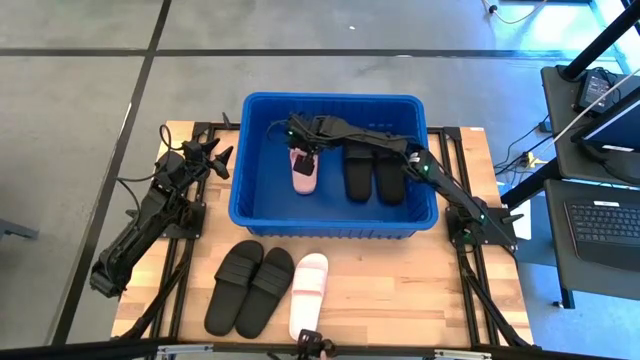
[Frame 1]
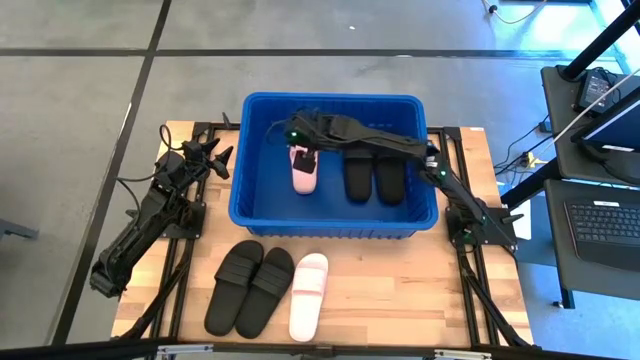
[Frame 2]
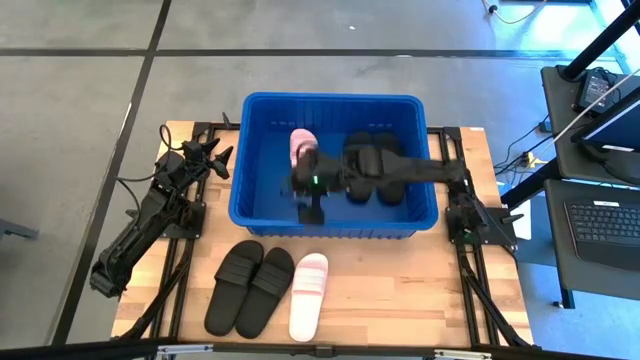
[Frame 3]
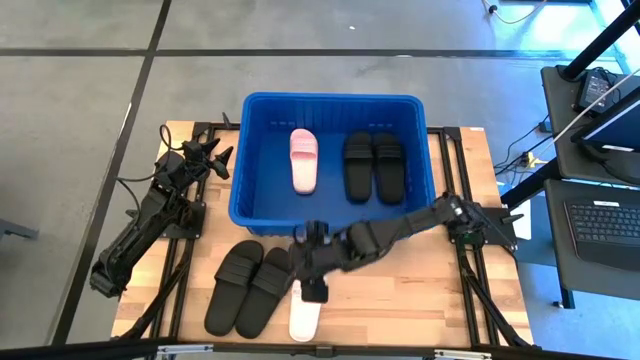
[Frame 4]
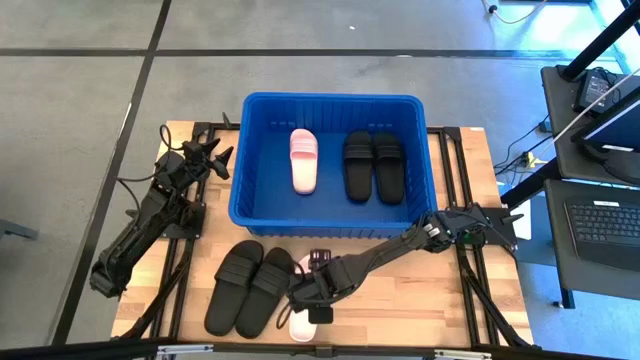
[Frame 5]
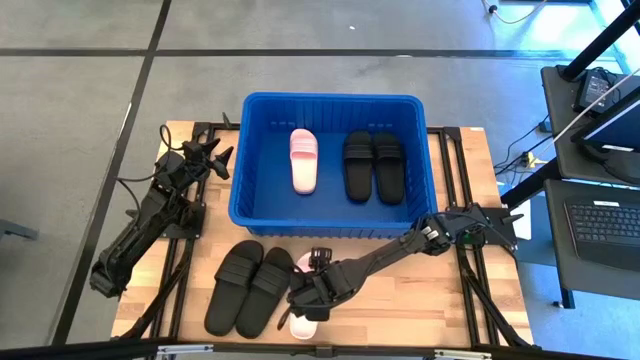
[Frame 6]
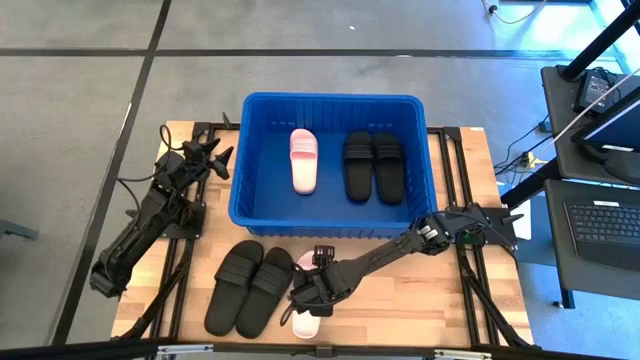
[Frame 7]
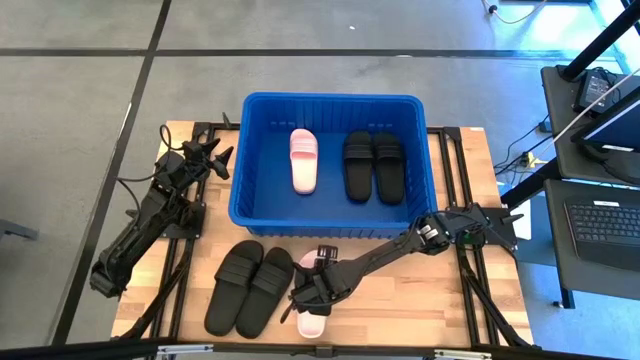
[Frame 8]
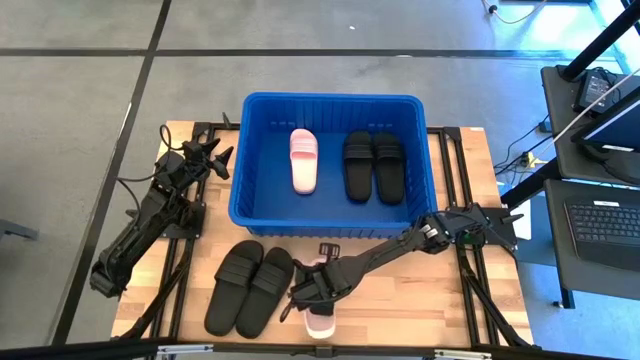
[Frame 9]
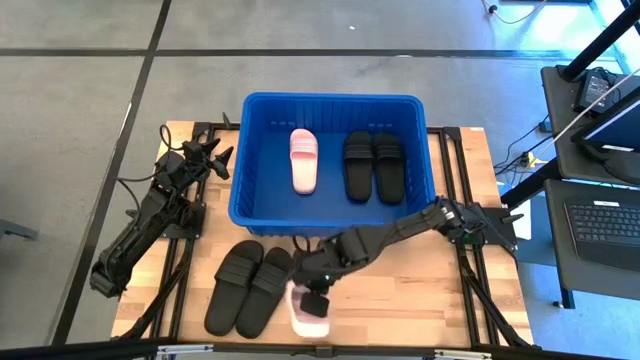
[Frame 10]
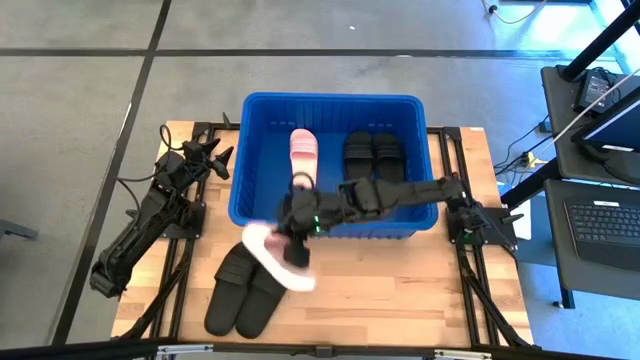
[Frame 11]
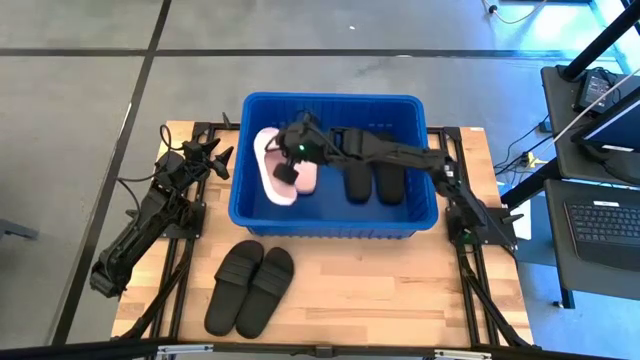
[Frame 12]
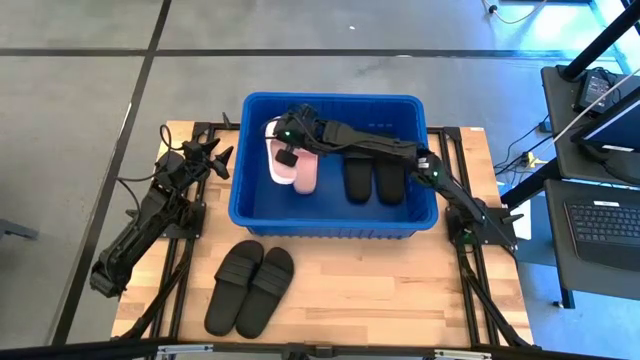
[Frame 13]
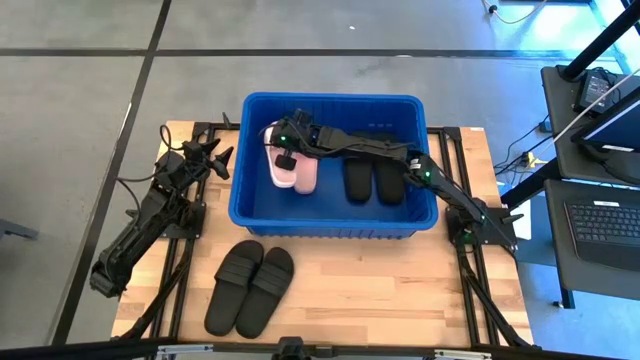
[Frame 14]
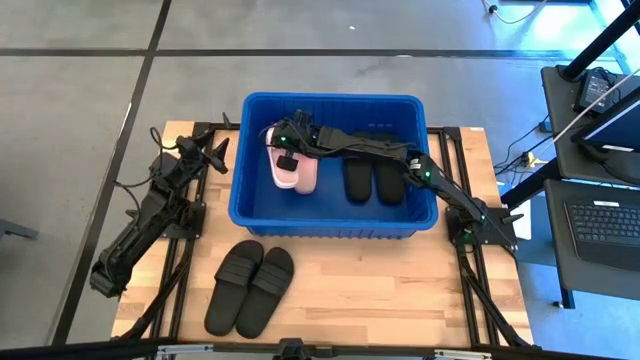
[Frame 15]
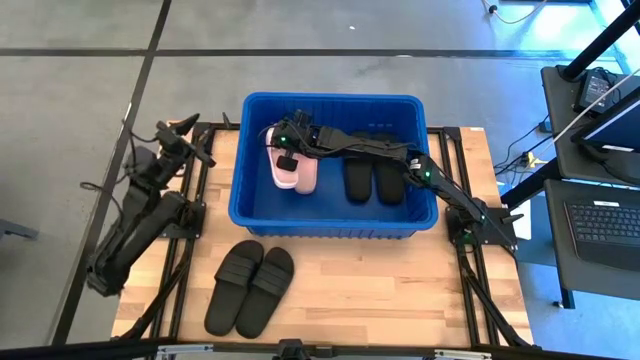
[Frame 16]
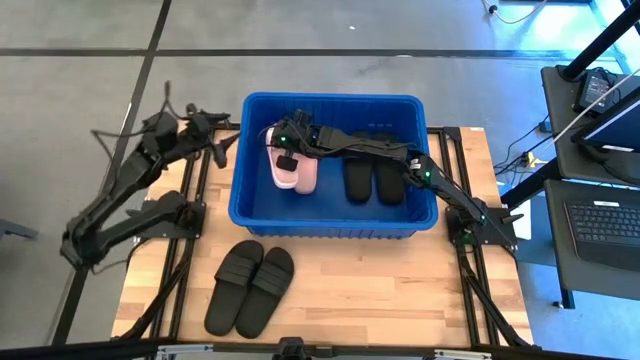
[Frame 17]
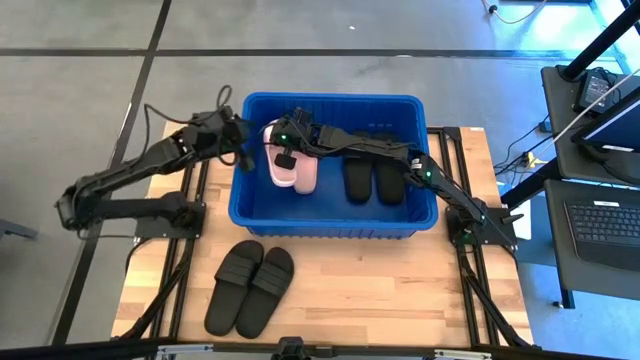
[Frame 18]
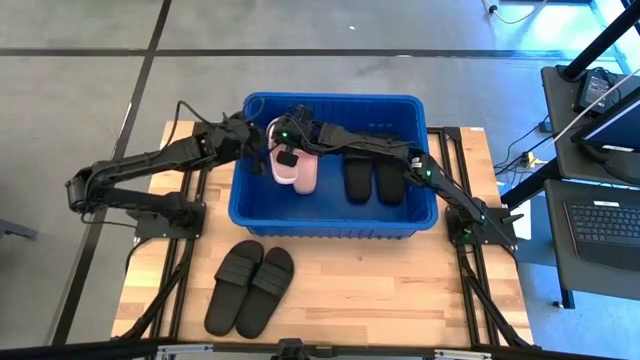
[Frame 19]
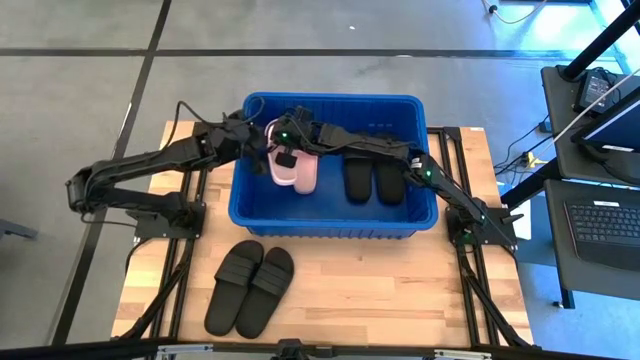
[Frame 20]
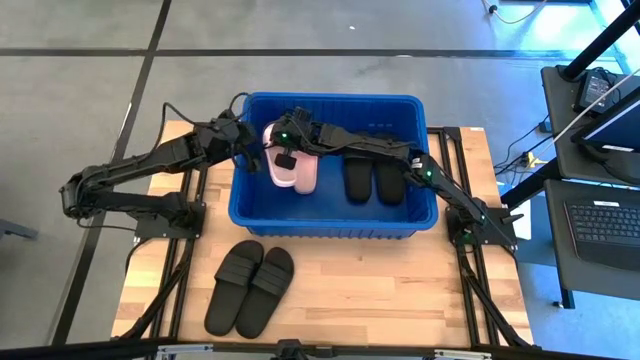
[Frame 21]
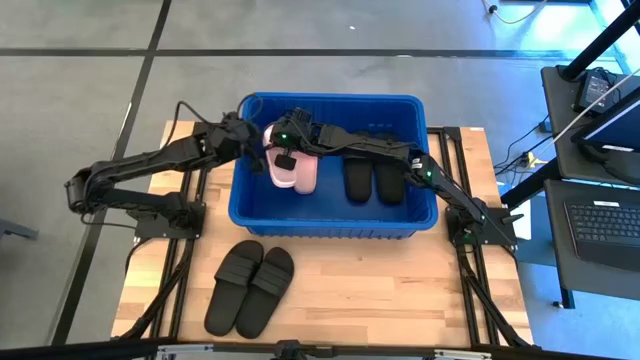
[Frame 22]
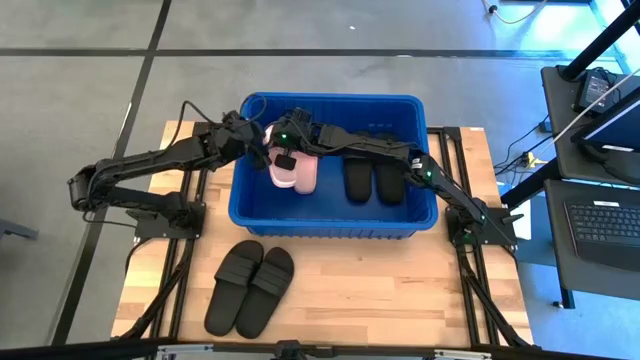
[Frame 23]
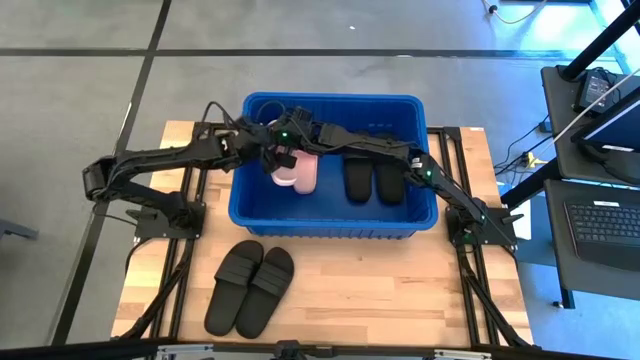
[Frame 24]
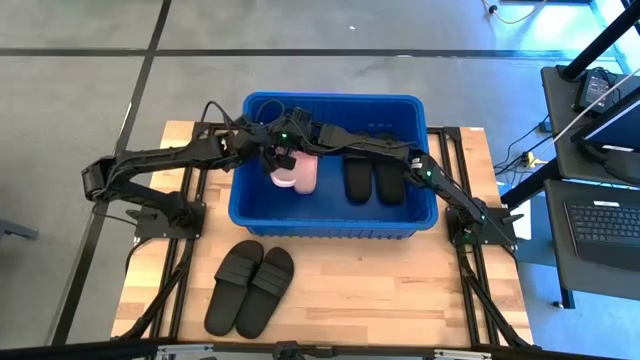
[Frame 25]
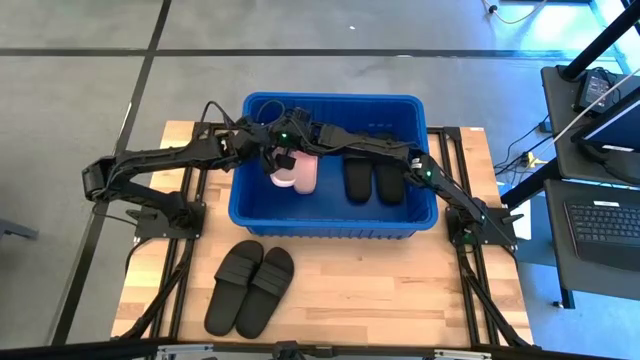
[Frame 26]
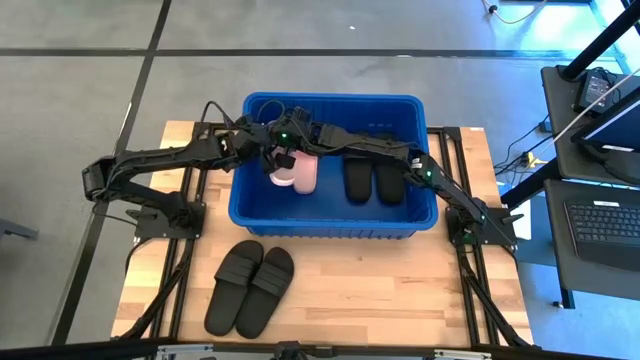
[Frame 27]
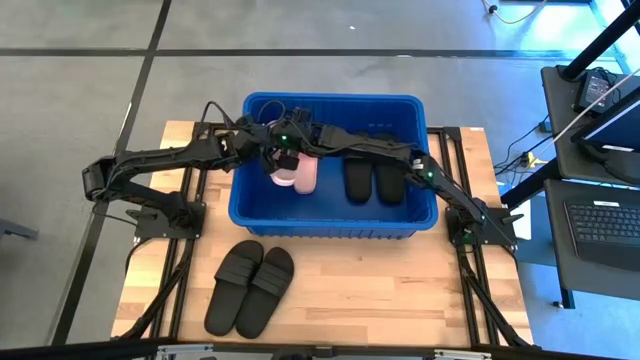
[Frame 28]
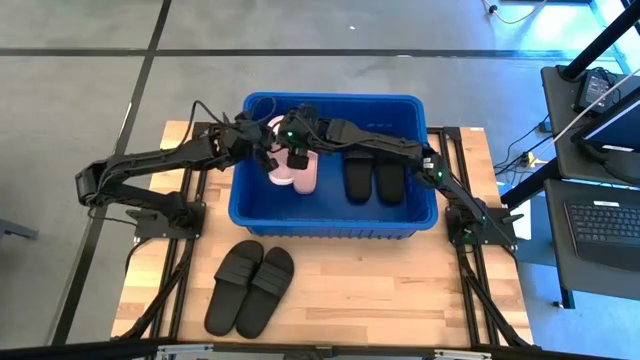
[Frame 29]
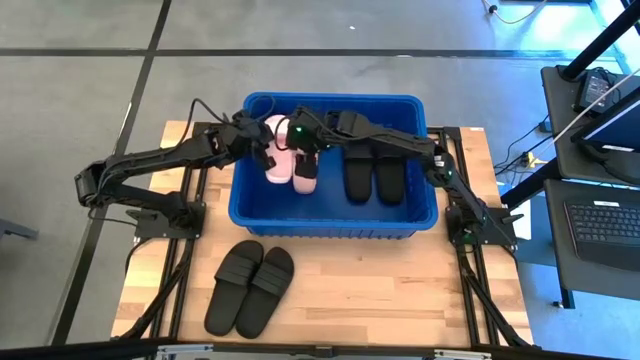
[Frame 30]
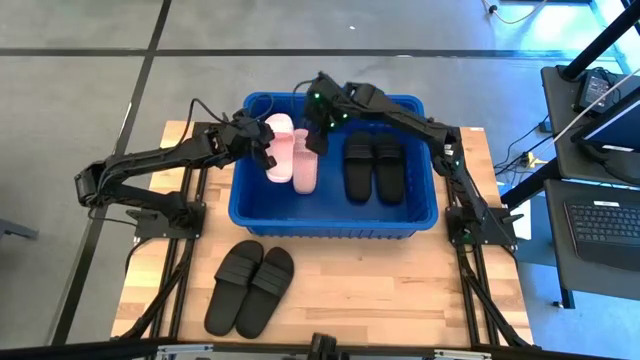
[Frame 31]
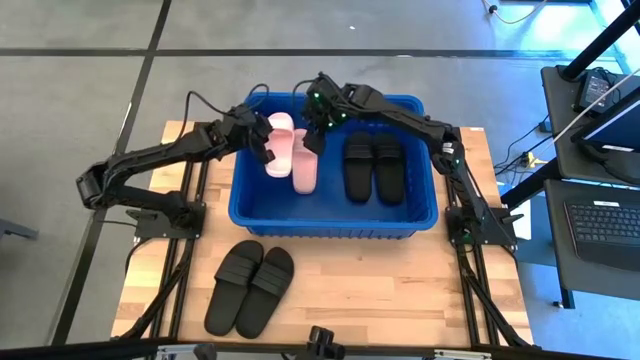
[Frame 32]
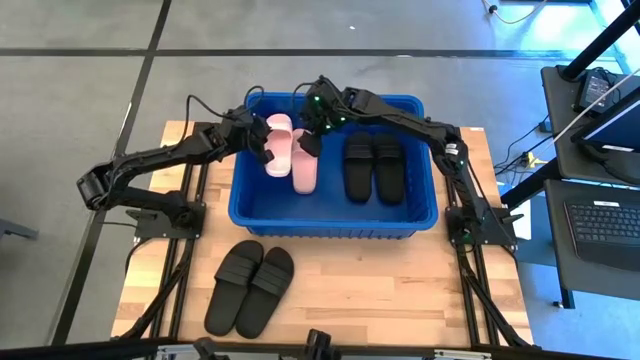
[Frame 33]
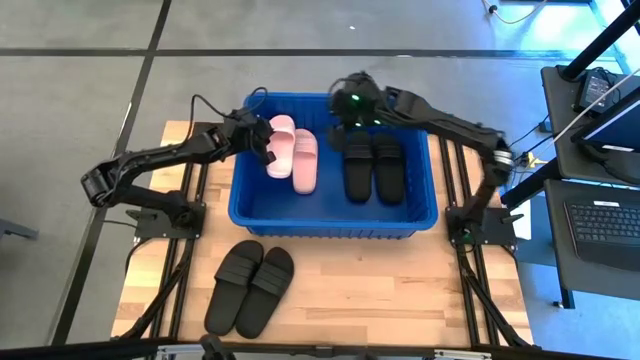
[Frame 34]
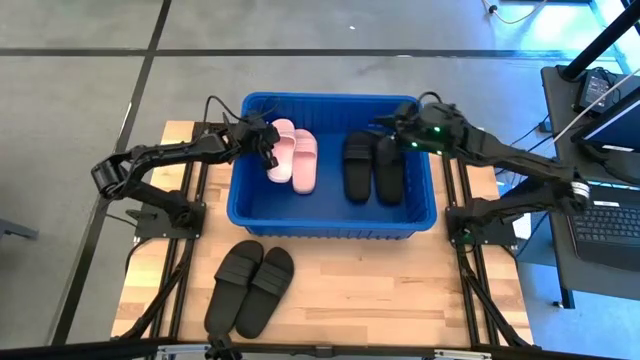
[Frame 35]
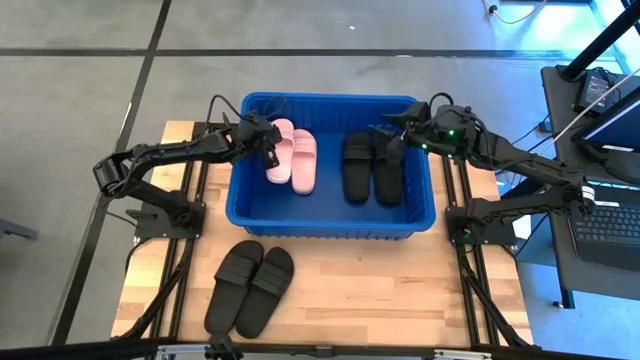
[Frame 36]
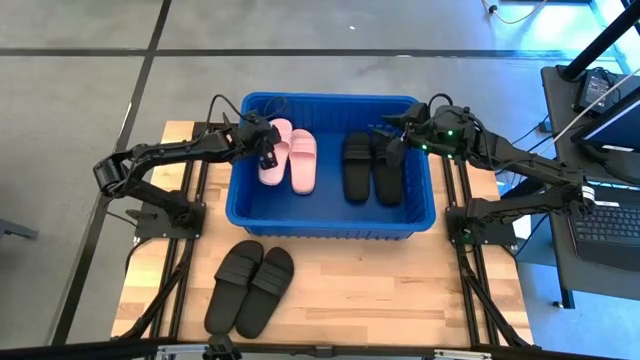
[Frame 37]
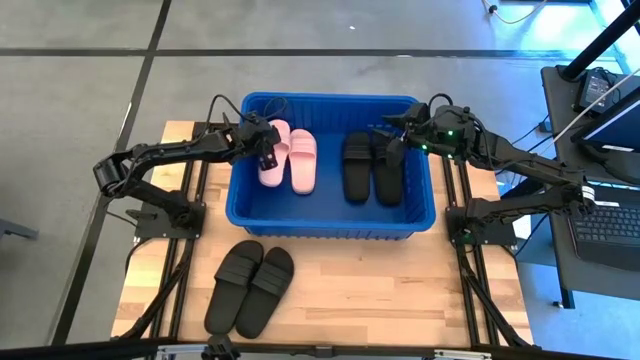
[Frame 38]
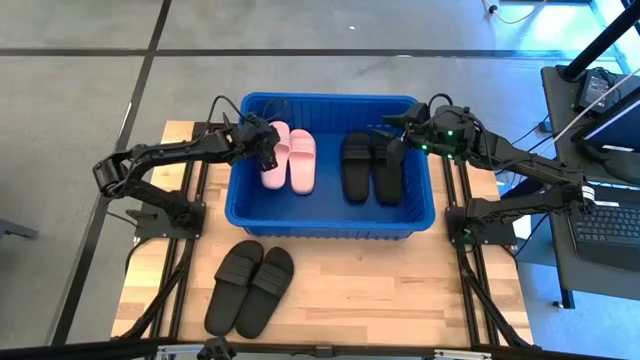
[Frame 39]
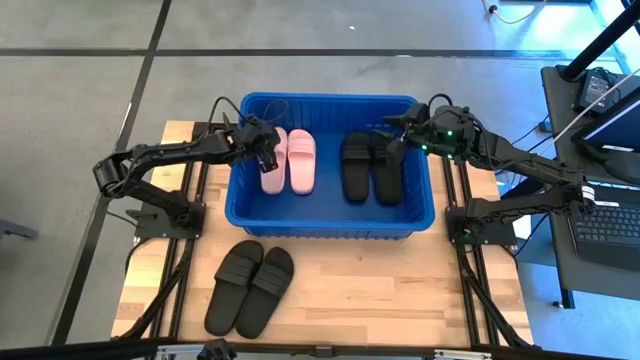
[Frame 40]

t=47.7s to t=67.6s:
Task: Pick and place slides into bin
Put the pink slipper into the blue bin
